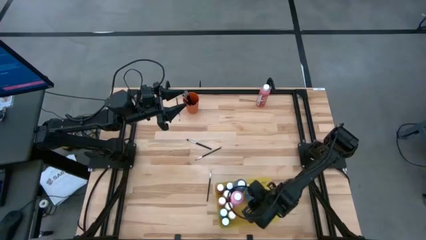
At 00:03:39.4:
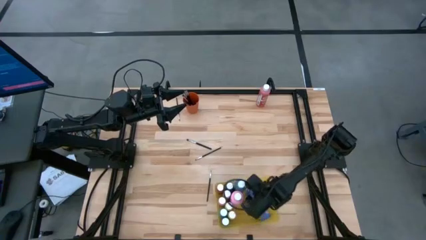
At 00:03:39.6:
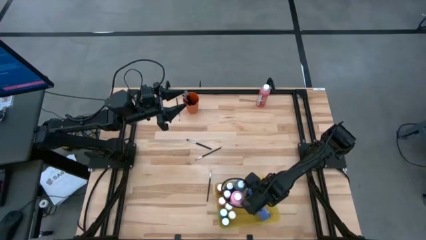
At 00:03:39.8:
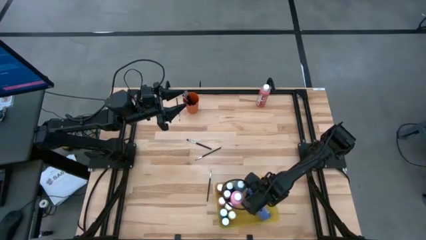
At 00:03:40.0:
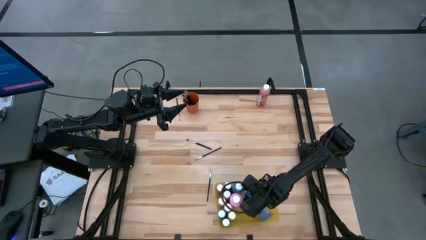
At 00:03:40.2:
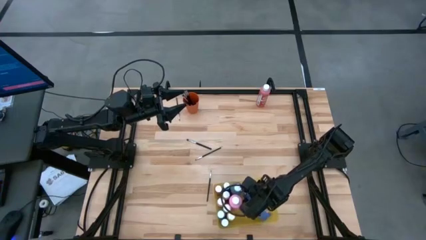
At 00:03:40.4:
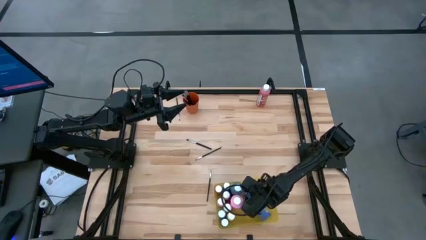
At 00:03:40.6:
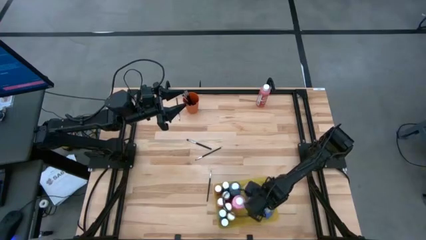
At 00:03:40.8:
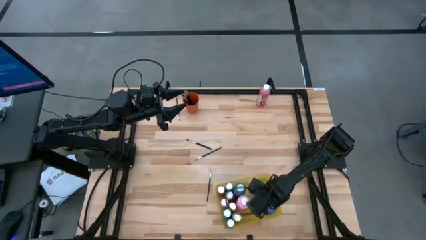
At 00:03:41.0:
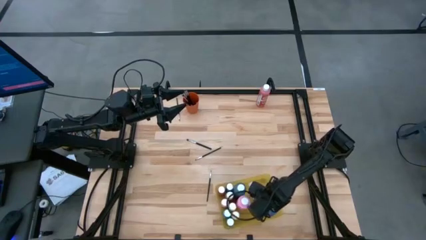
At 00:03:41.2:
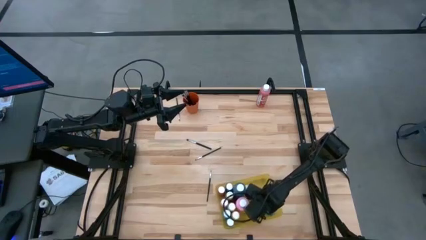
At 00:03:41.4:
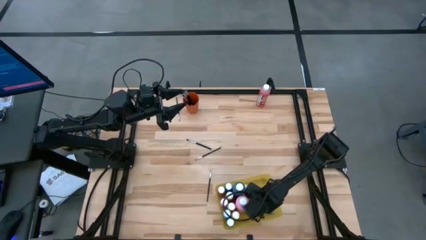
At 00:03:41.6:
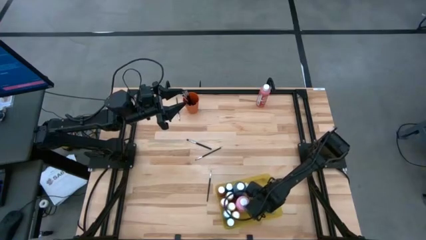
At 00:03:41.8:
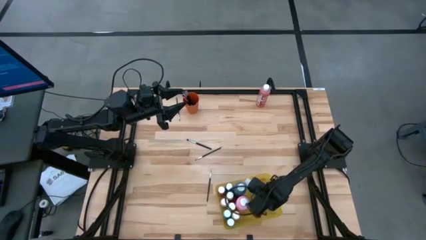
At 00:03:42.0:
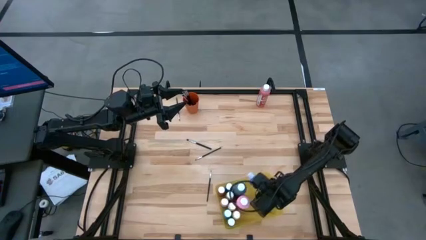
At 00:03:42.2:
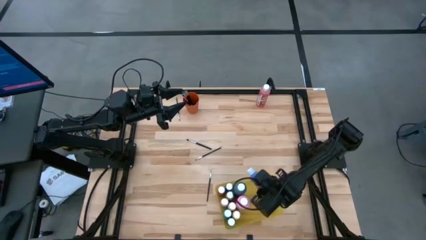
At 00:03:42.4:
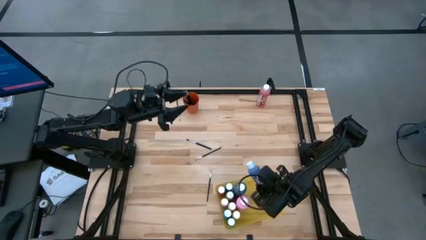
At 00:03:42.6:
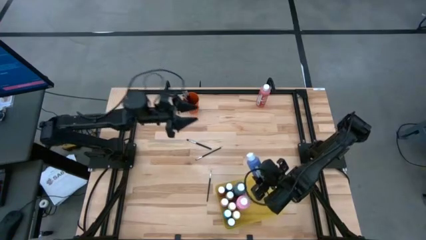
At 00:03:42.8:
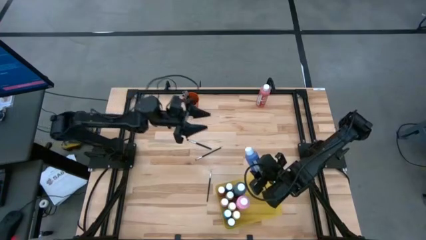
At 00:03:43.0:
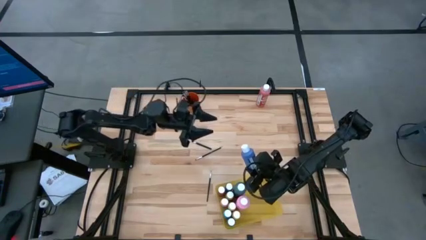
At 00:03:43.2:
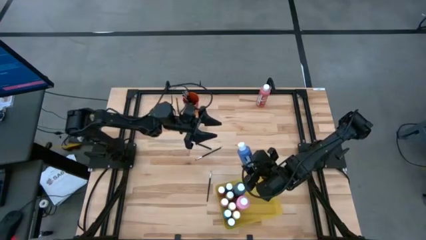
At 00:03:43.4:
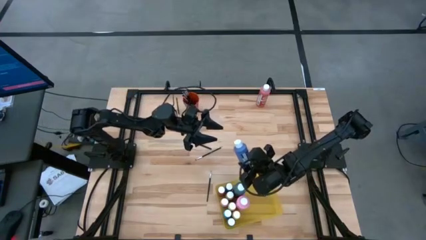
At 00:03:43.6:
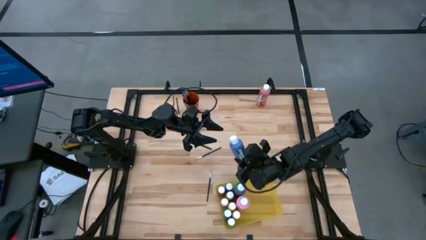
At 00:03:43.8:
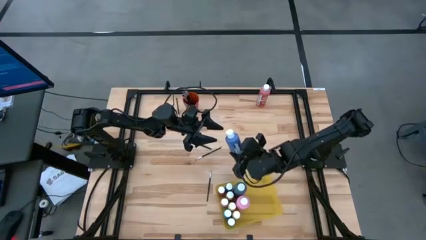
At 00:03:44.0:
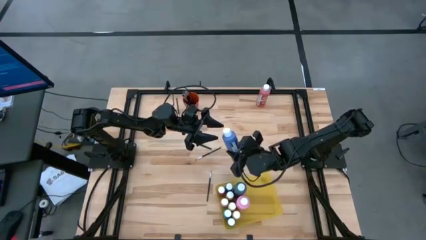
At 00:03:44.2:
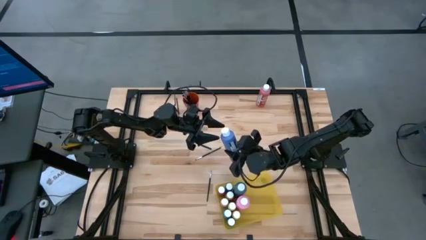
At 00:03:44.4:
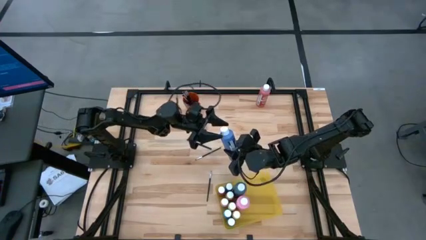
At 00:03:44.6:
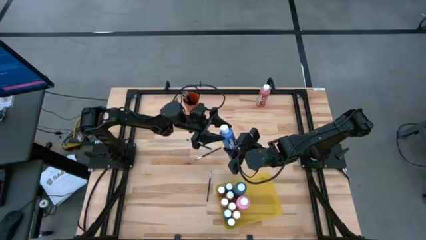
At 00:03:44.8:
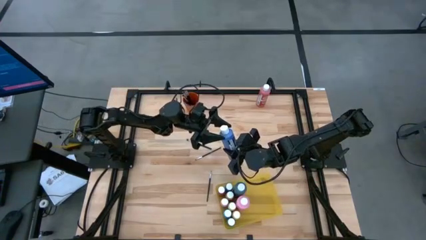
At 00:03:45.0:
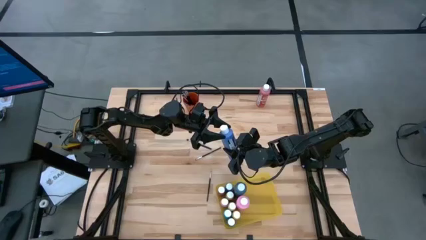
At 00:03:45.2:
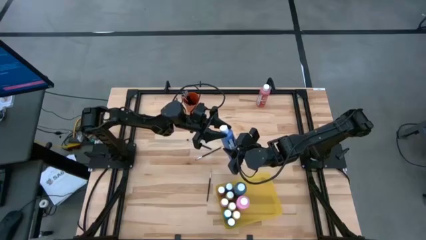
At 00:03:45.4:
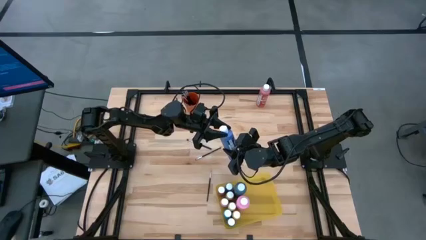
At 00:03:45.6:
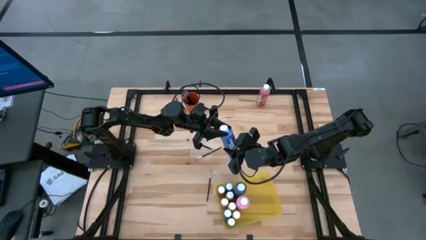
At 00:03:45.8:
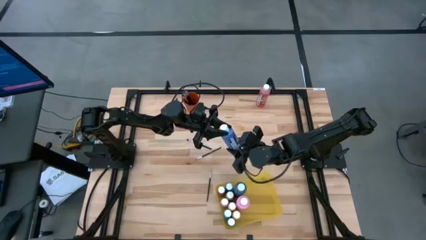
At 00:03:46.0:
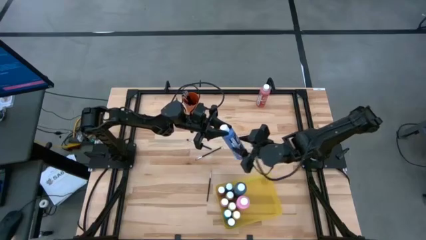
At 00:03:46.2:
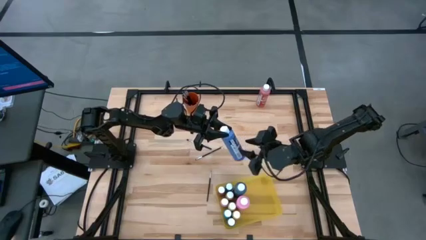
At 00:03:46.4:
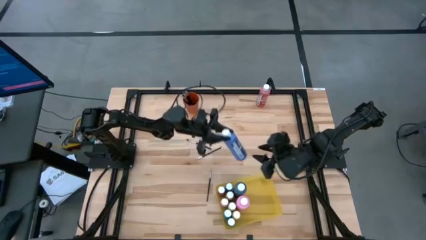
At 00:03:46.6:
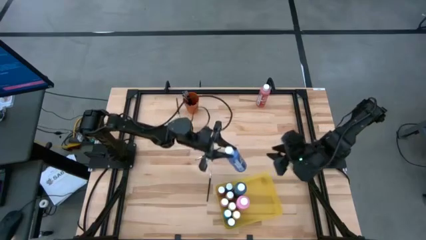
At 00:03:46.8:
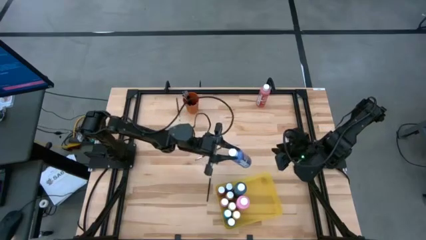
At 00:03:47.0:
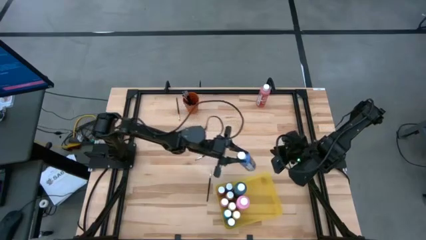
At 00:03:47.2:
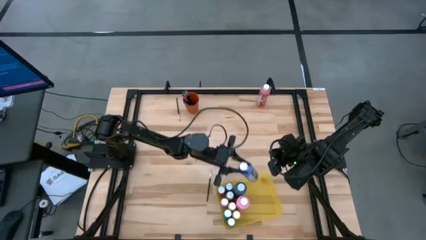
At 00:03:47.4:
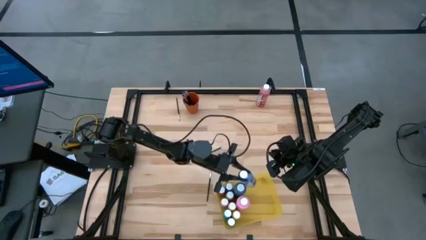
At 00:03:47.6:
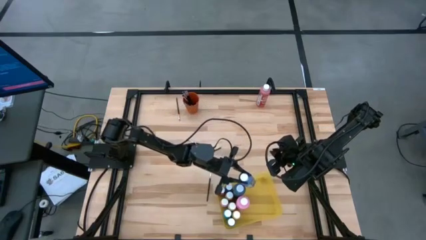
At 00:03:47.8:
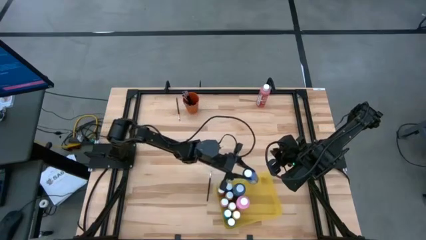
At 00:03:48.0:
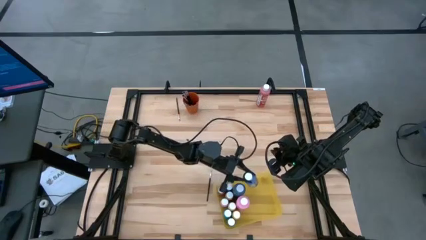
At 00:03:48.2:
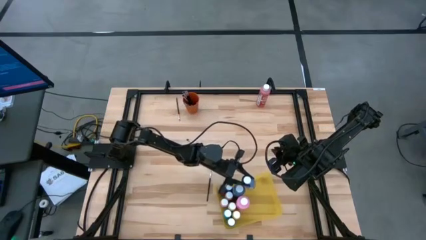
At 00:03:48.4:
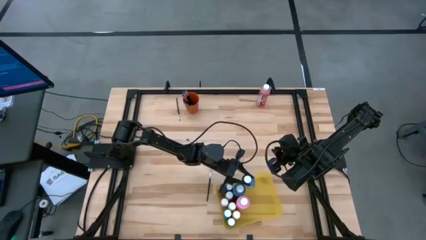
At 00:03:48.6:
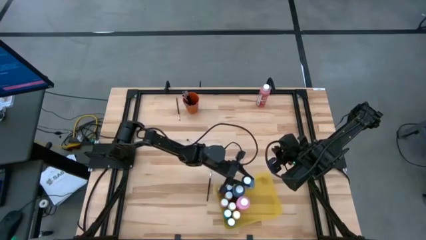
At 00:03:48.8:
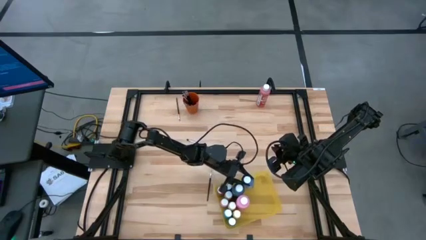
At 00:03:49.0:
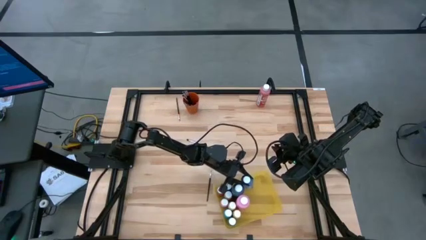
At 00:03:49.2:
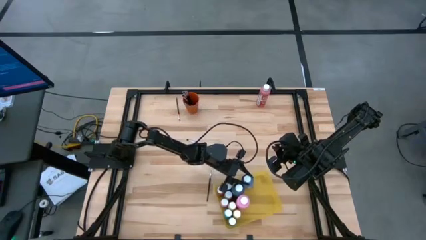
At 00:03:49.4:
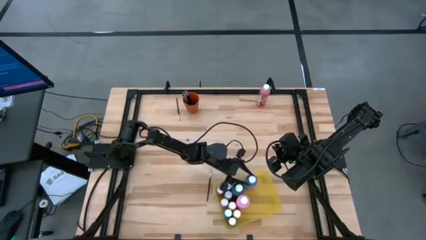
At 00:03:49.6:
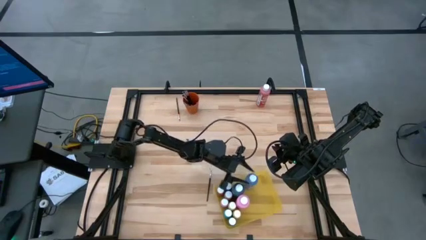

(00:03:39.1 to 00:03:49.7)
Task: Pick & Place Paint Supplies
Put the purple paint bottle into the yellow bin

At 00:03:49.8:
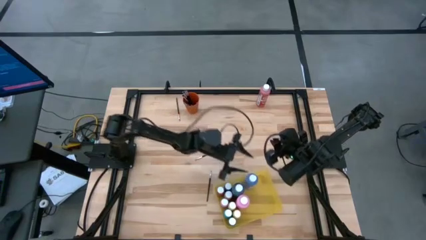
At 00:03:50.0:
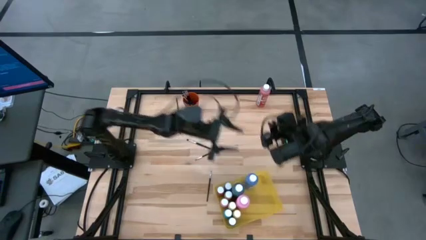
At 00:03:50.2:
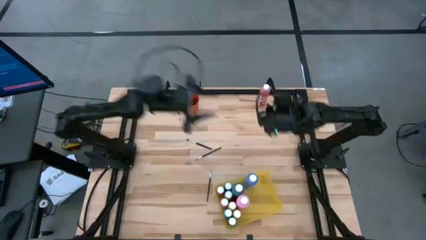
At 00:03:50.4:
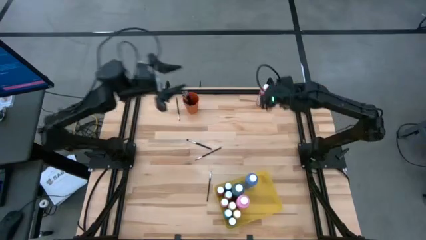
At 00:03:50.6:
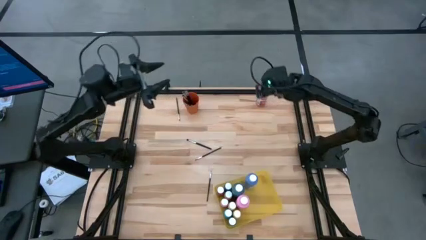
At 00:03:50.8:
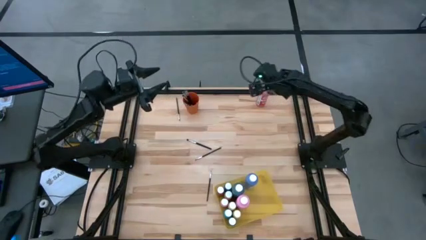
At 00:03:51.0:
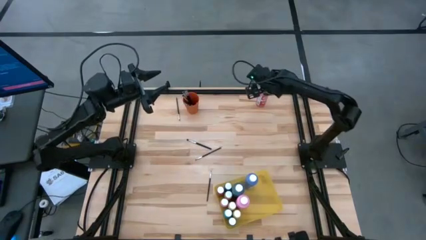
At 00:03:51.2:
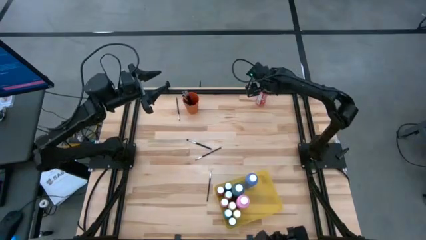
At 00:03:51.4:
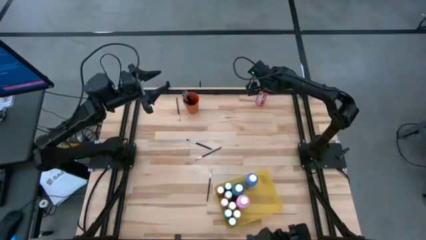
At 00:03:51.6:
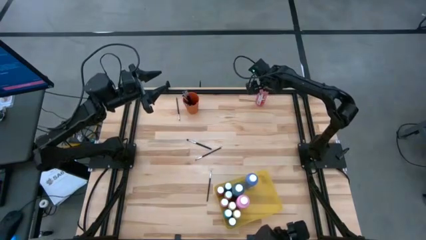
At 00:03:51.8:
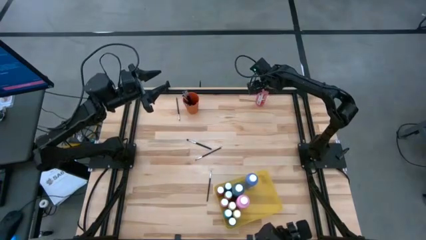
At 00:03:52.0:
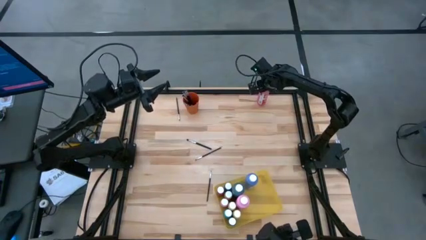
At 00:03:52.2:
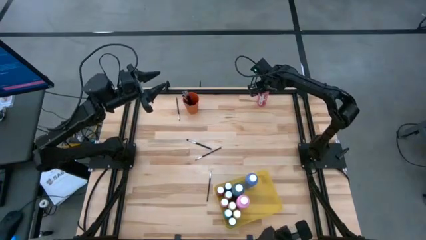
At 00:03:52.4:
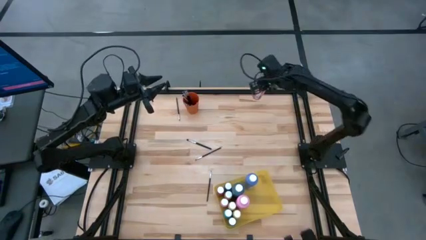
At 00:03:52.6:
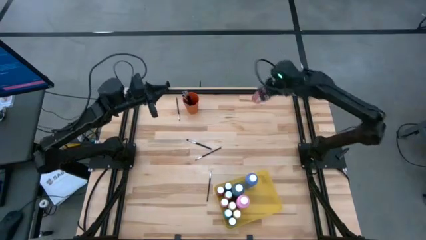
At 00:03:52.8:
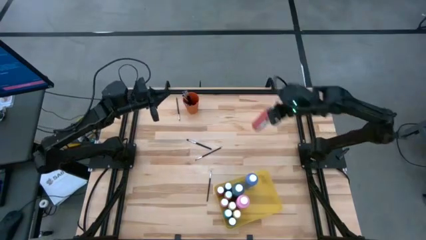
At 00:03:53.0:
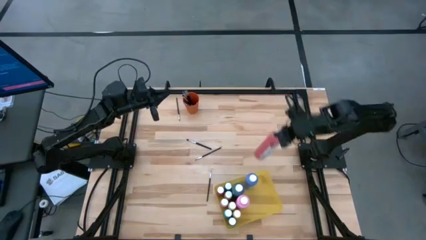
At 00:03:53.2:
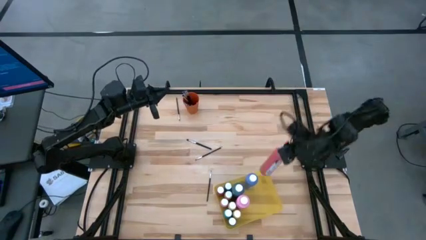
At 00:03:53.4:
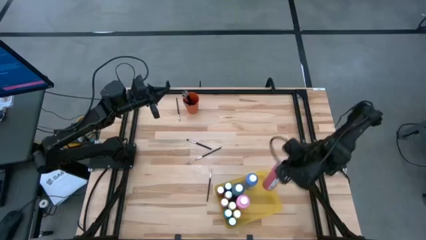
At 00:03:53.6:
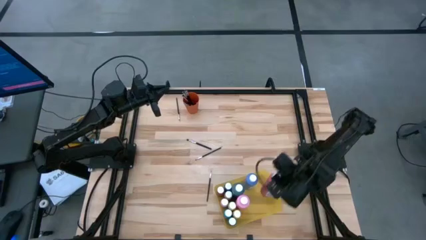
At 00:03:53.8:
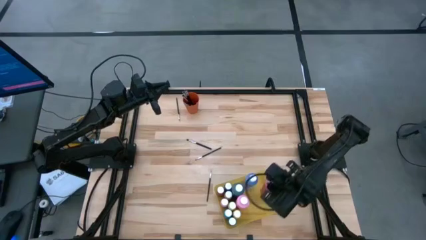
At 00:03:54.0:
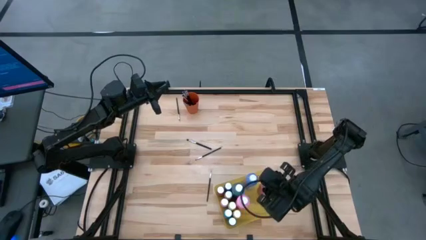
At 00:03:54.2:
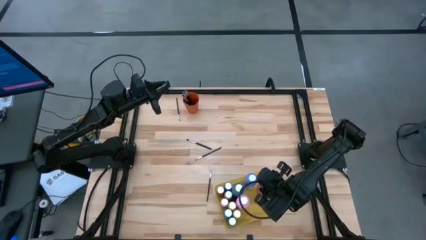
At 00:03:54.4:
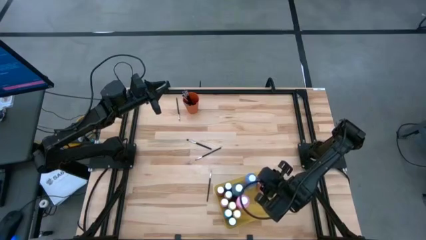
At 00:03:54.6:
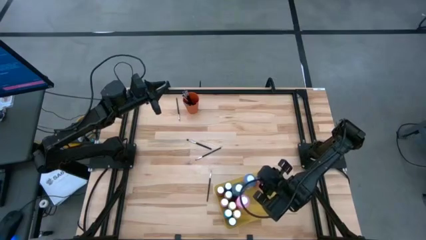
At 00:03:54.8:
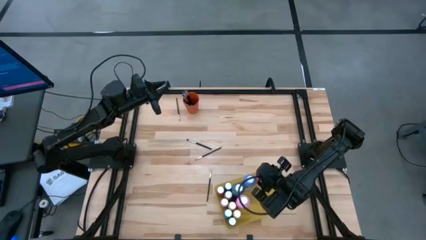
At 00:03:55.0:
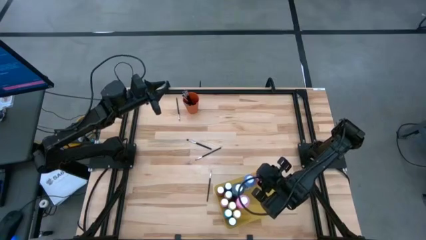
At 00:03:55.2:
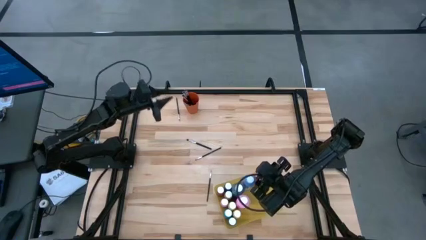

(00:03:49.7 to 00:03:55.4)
Put the red paint bottle into the yellow bin
